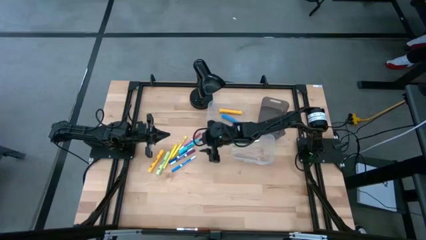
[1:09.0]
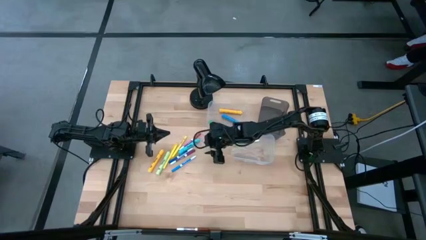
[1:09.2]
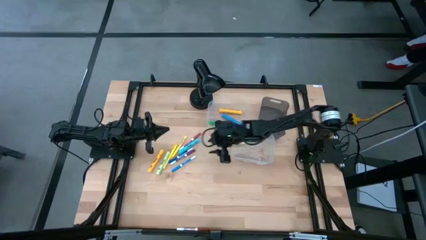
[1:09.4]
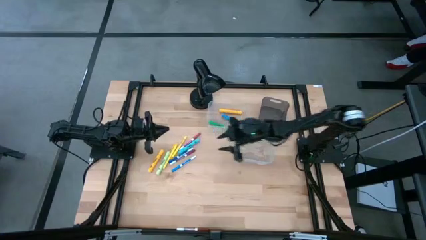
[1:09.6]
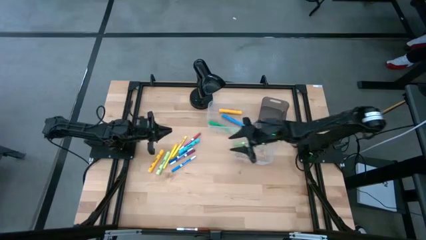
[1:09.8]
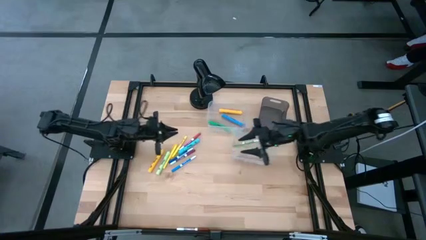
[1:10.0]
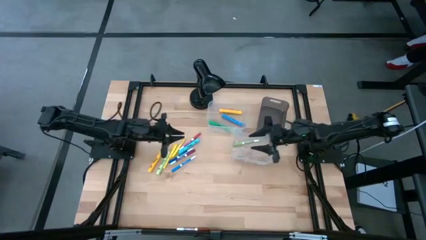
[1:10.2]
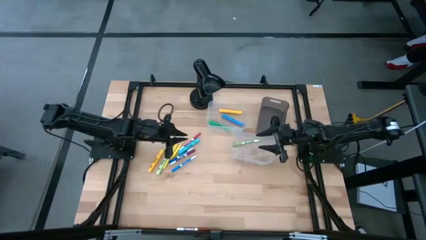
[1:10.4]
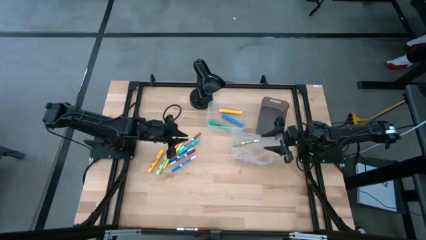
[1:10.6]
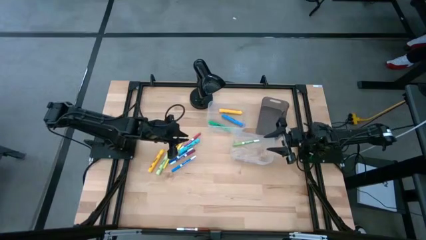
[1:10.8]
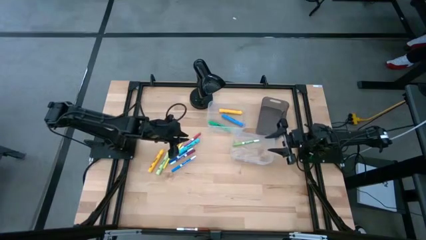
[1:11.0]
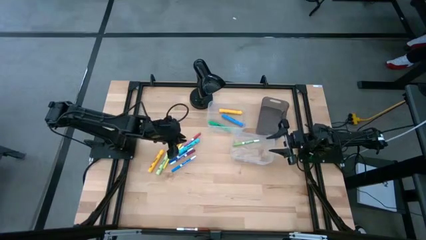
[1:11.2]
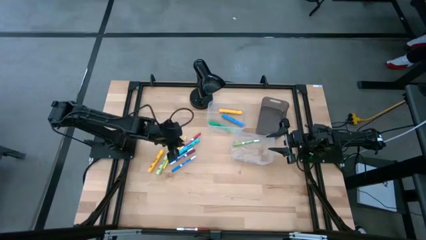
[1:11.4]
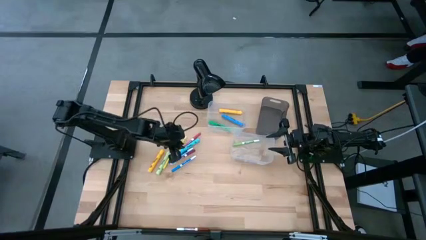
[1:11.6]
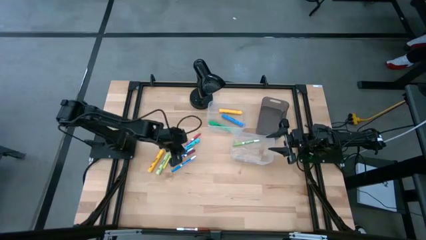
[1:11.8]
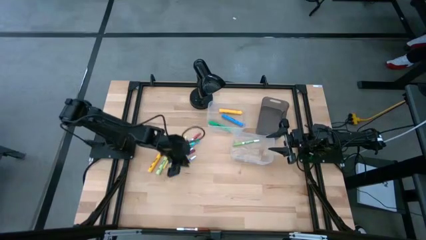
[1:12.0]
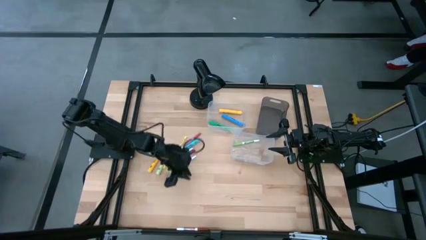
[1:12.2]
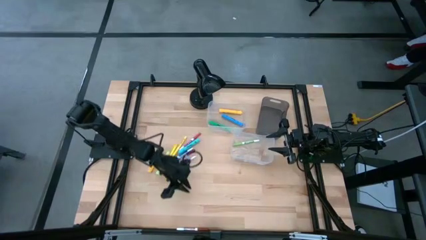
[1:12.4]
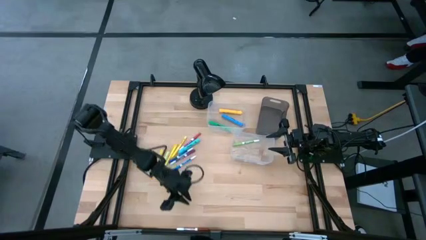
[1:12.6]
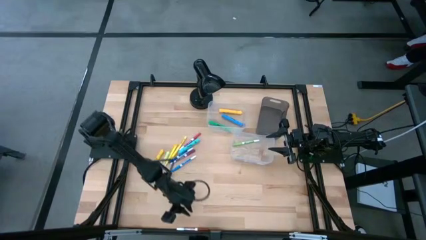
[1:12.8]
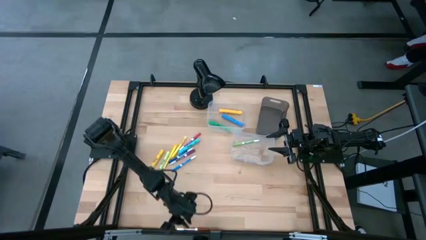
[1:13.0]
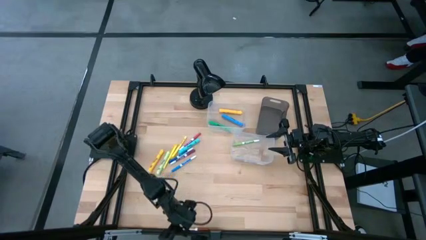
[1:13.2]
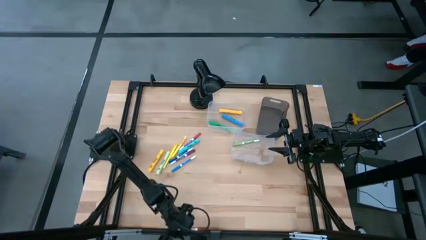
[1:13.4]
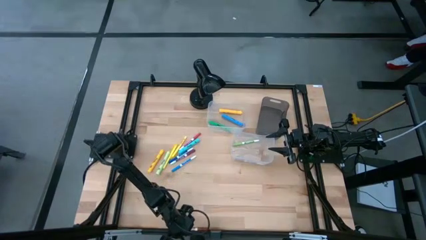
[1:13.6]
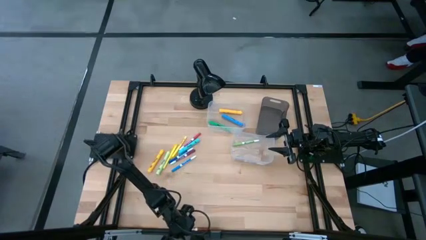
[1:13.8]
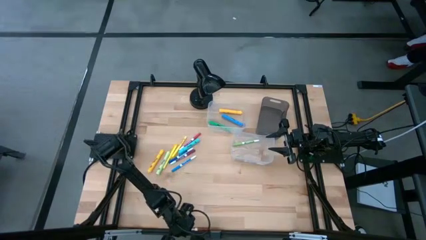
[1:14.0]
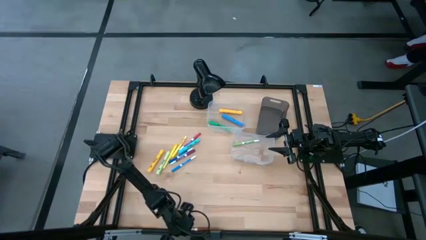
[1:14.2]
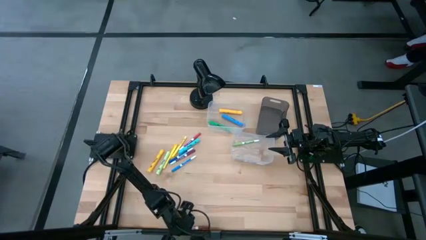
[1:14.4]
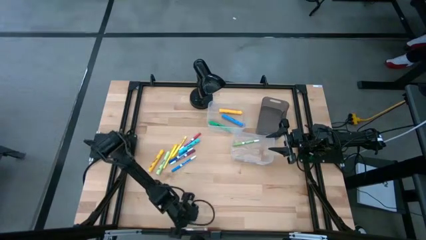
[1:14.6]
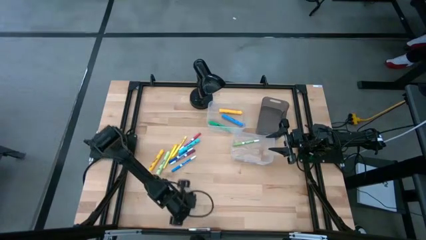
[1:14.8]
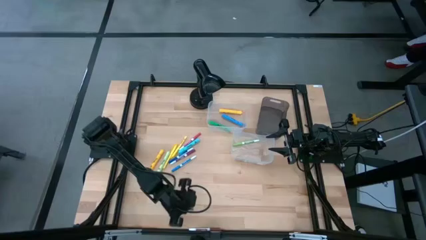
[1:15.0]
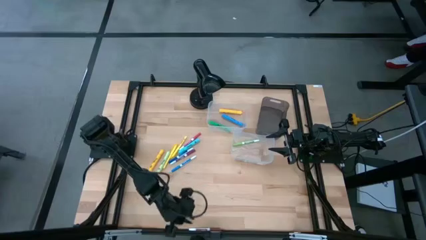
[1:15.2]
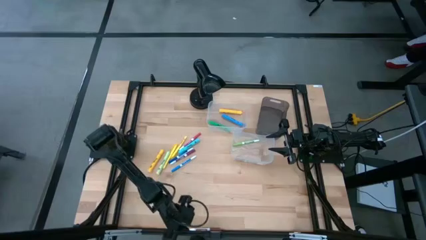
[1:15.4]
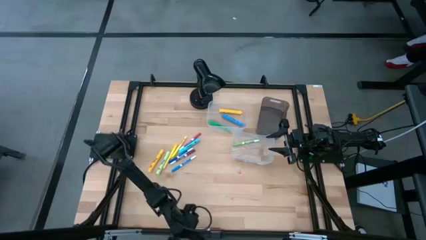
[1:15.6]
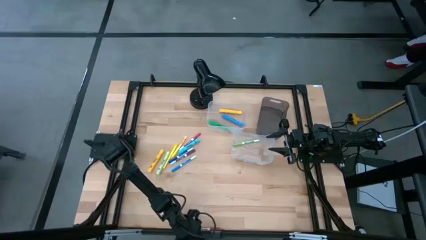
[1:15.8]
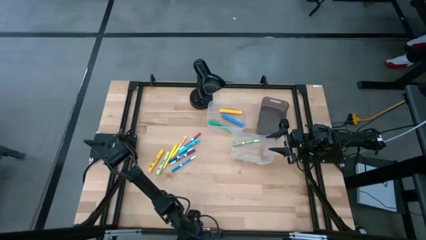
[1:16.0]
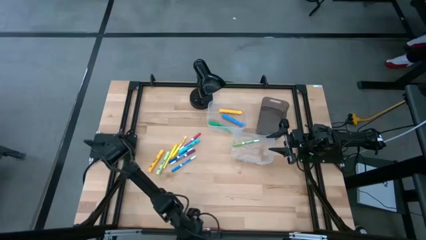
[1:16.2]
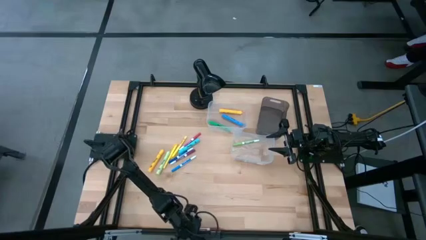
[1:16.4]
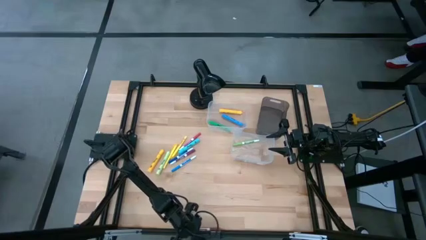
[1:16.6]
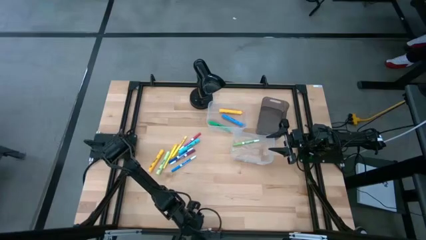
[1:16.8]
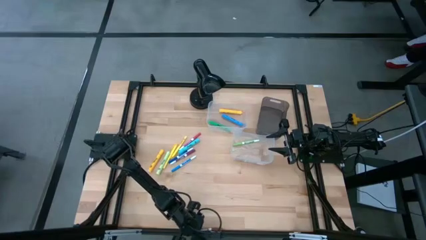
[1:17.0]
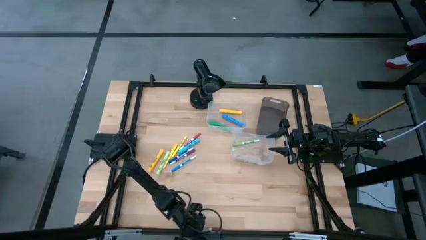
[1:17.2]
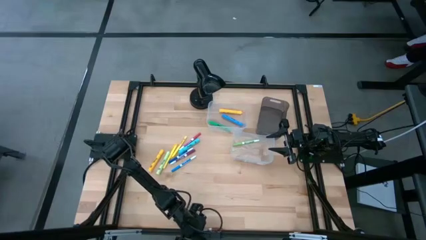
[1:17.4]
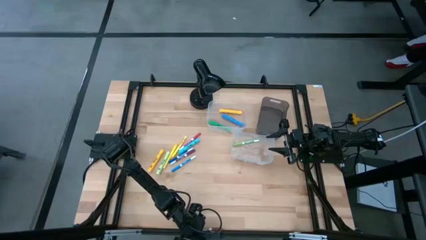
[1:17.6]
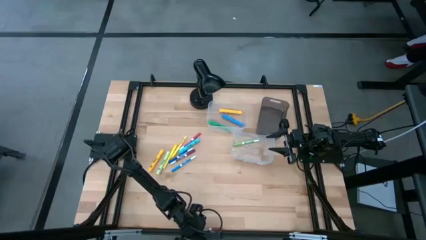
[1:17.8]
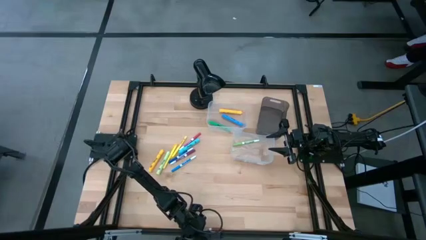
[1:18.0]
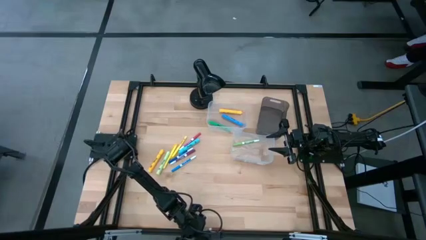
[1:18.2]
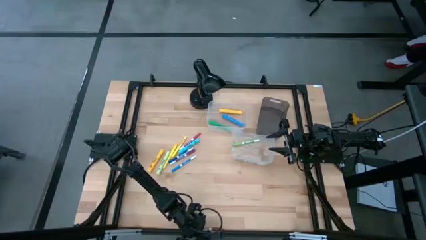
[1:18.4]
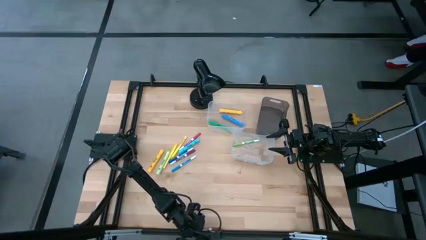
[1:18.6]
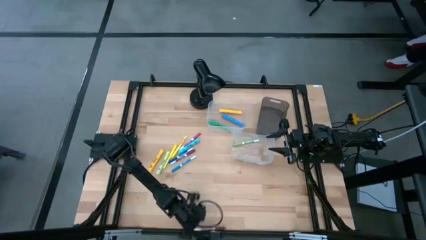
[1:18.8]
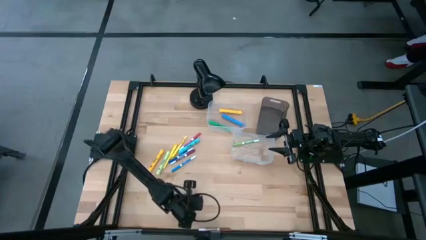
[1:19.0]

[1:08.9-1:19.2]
Task: Pick & Place Markers
Put the brown marker pen into the bottom transparent bin

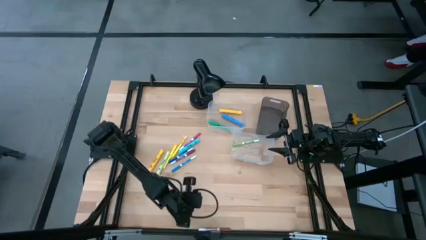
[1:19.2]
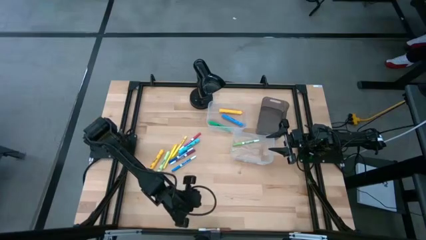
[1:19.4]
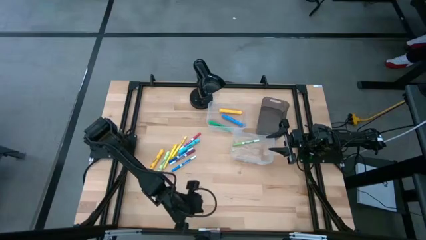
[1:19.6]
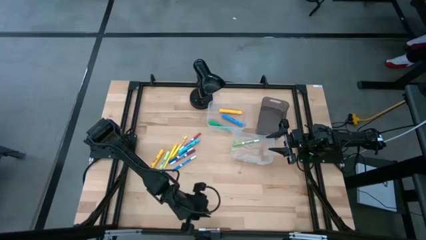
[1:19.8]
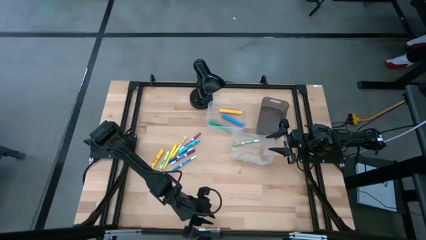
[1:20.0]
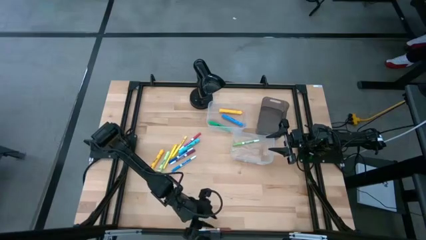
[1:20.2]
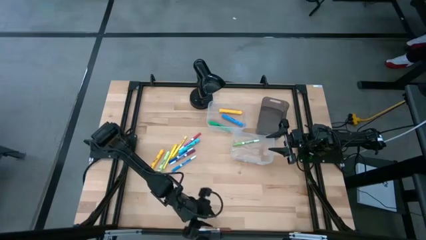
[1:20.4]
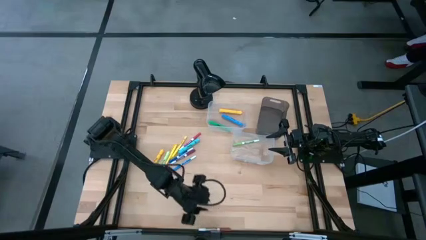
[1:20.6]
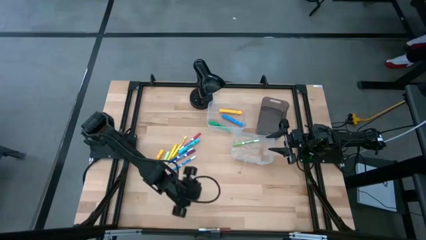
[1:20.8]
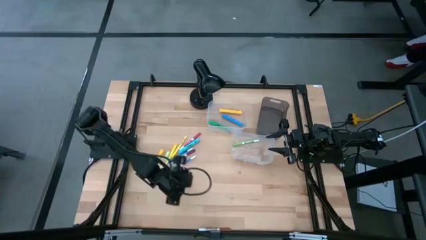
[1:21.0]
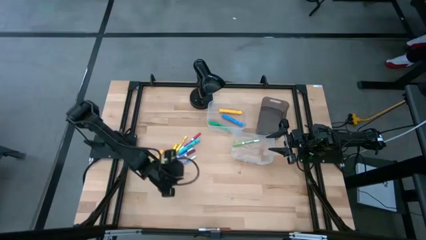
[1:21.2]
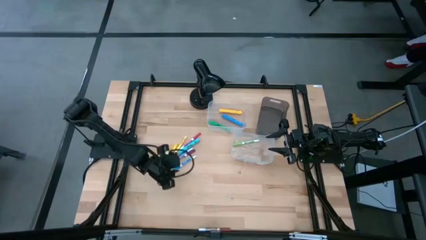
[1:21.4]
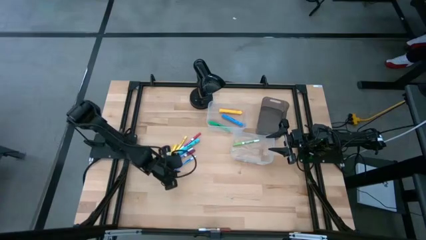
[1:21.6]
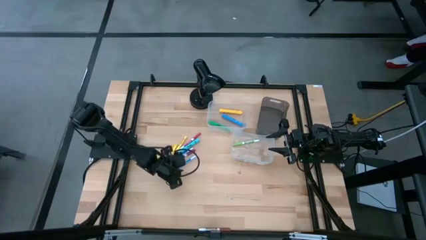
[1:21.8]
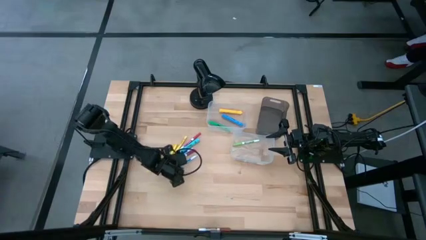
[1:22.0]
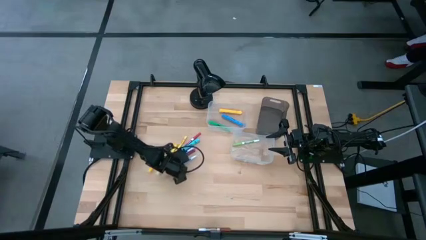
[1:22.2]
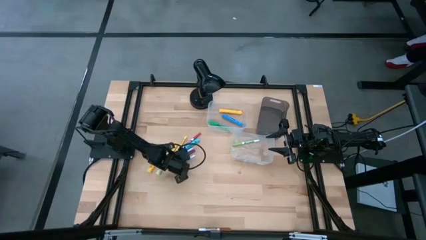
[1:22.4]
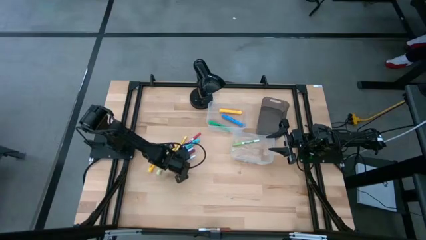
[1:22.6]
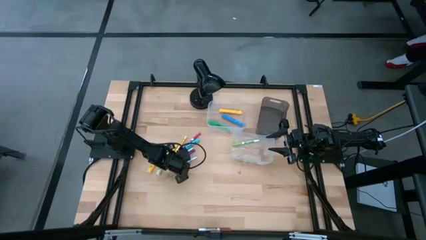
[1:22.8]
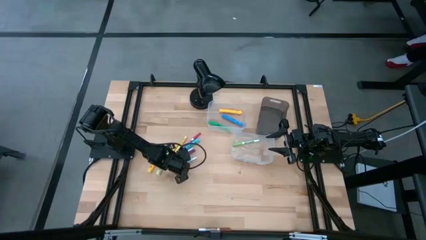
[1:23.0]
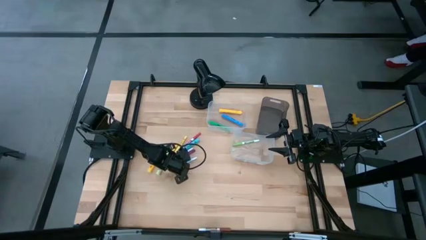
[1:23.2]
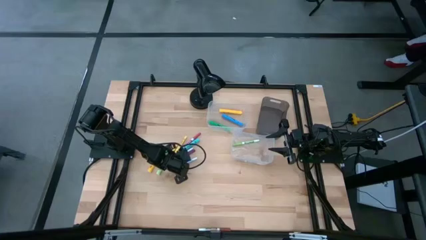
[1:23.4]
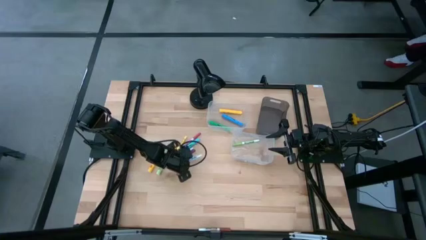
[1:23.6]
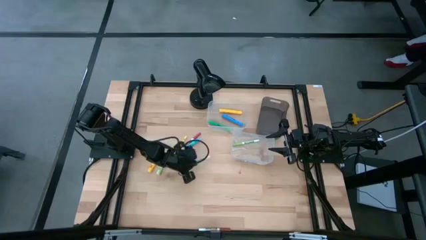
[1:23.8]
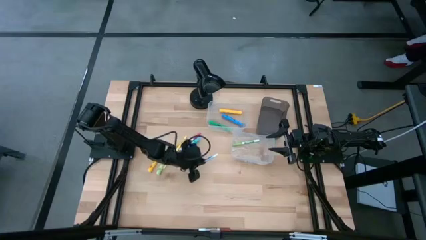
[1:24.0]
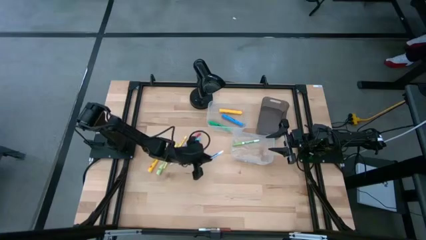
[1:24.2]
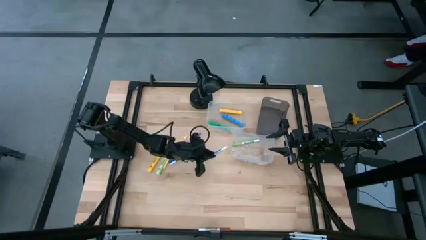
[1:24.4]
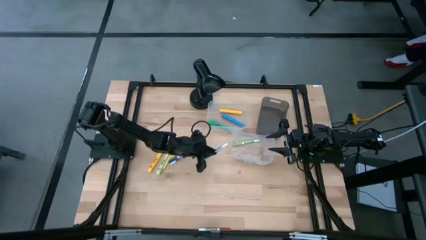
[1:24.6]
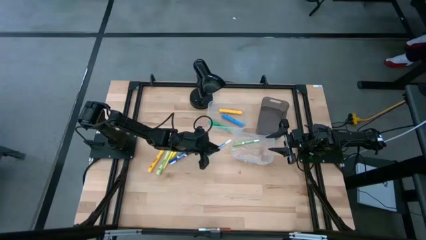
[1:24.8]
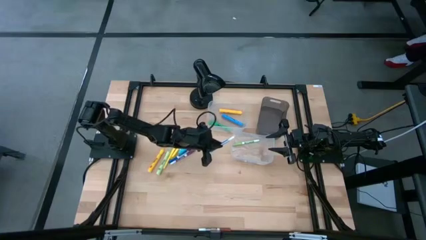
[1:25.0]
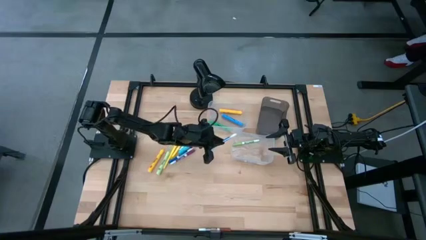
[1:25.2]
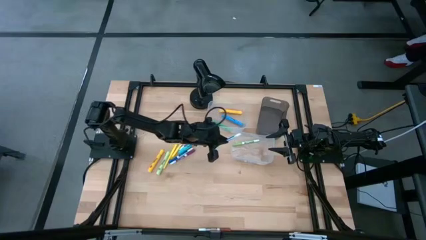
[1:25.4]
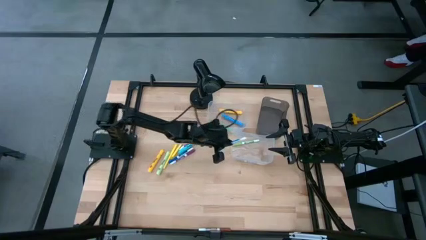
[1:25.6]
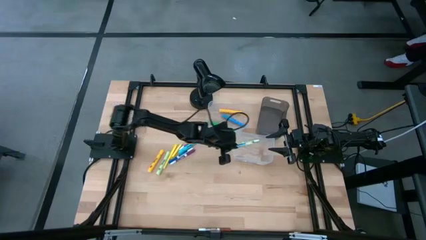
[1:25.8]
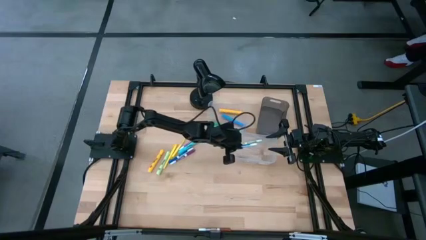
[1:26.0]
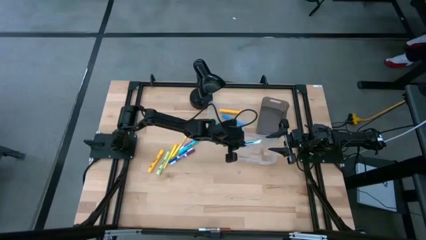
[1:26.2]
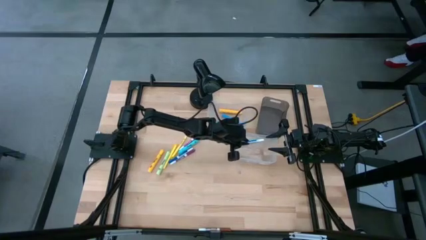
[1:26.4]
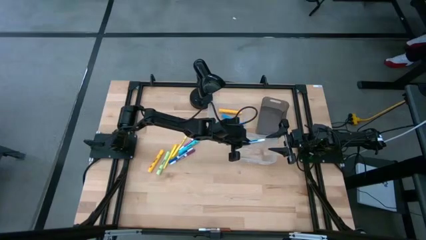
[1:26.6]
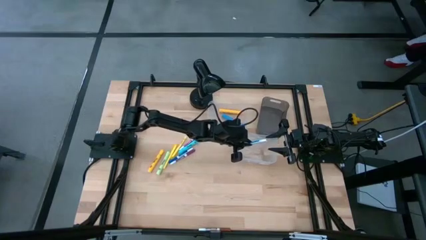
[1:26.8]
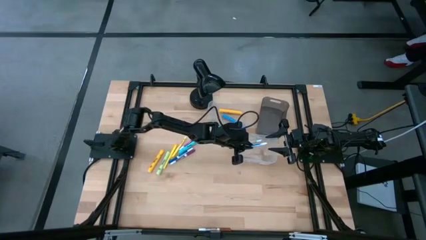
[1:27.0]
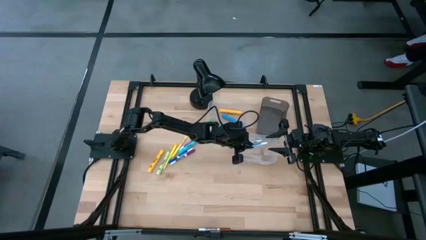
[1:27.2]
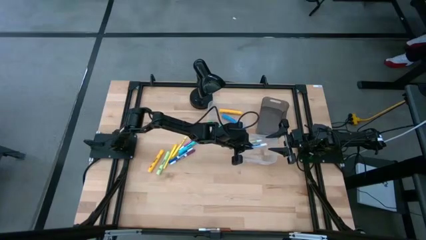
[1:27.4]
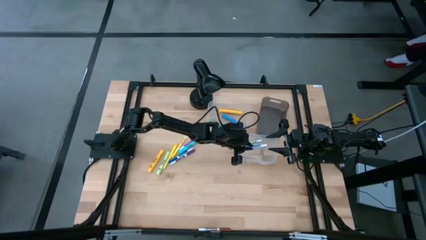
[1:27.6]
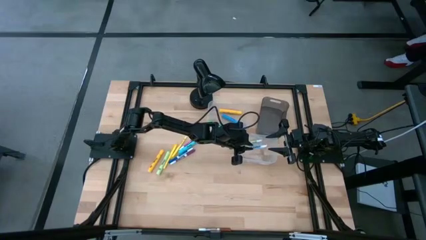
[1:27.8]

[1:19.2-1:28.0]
Put the light blue marker pen into the bottom transparent bin
